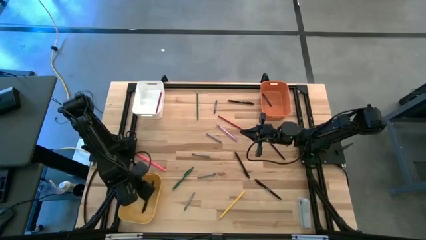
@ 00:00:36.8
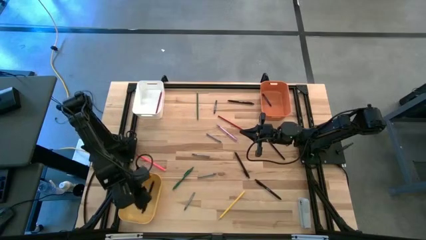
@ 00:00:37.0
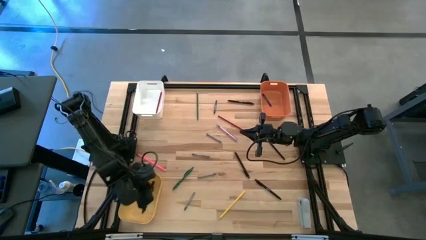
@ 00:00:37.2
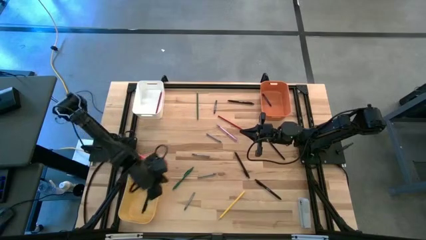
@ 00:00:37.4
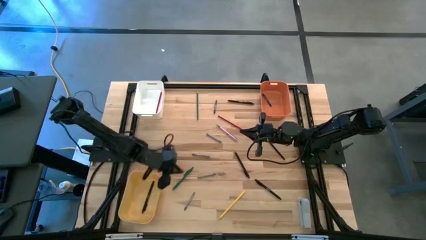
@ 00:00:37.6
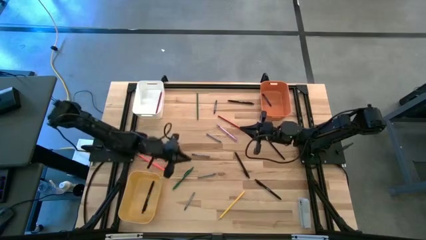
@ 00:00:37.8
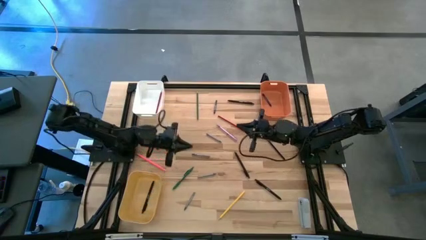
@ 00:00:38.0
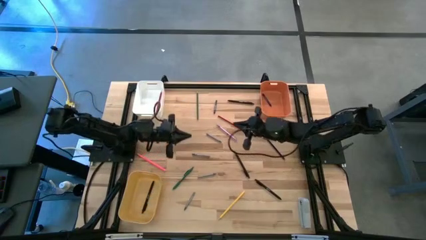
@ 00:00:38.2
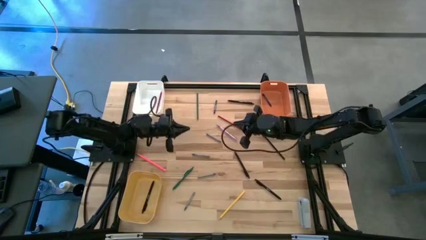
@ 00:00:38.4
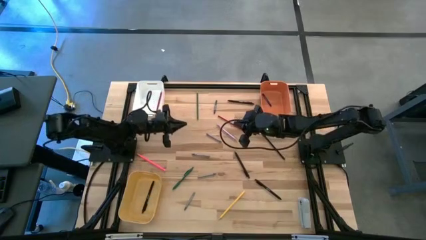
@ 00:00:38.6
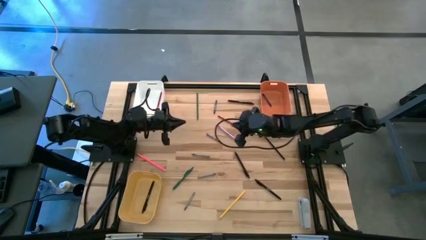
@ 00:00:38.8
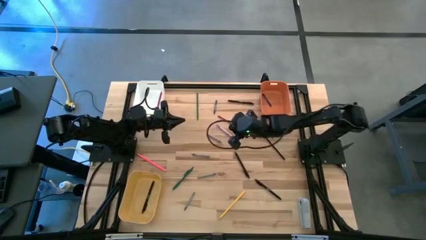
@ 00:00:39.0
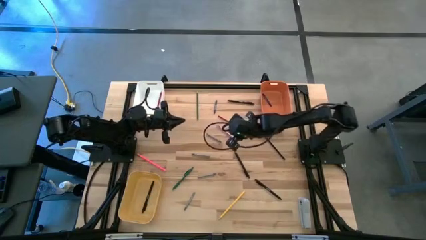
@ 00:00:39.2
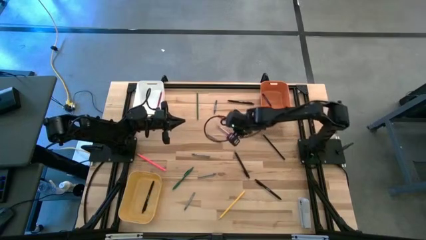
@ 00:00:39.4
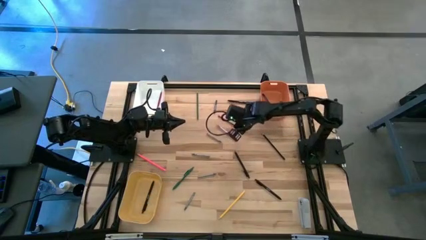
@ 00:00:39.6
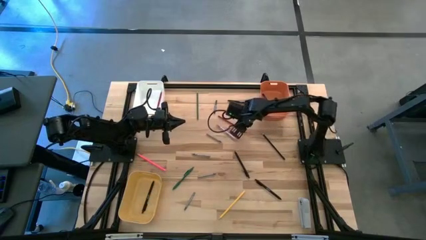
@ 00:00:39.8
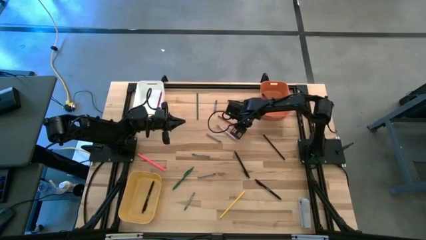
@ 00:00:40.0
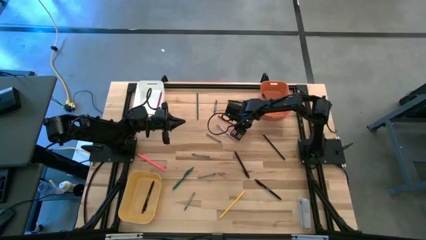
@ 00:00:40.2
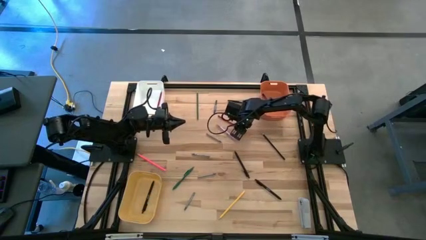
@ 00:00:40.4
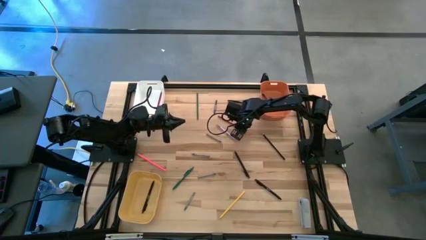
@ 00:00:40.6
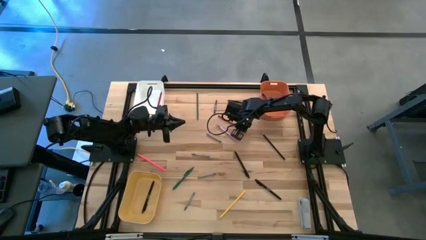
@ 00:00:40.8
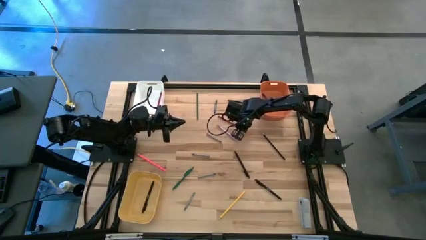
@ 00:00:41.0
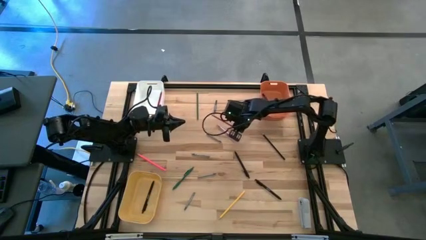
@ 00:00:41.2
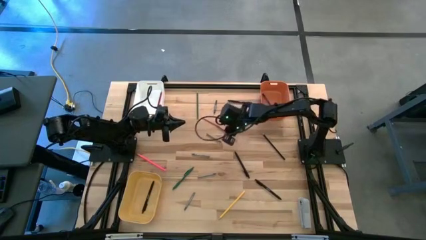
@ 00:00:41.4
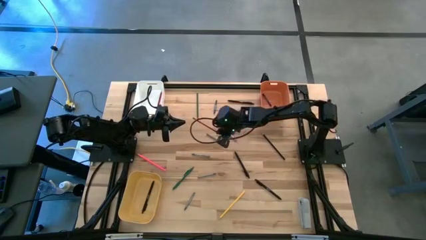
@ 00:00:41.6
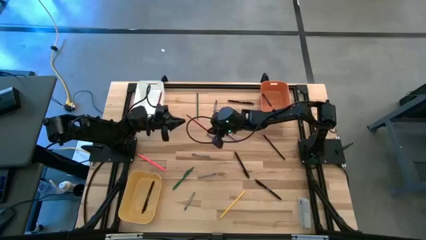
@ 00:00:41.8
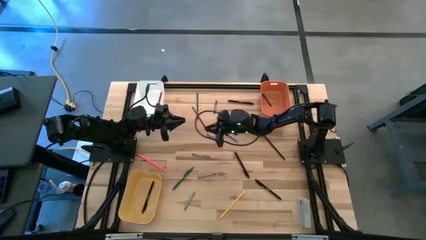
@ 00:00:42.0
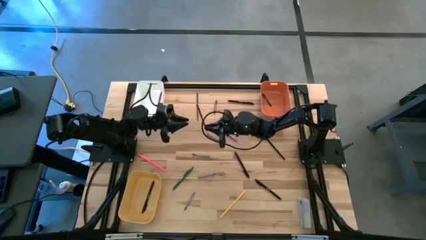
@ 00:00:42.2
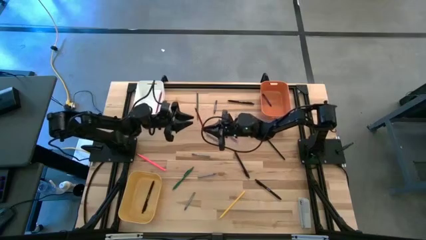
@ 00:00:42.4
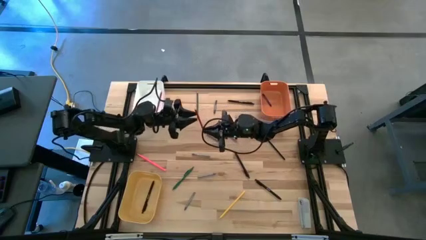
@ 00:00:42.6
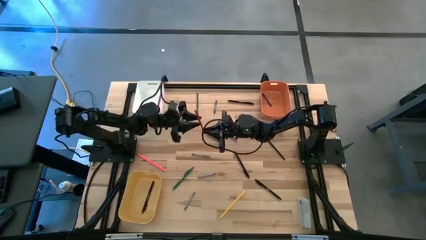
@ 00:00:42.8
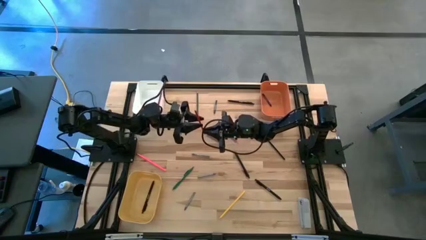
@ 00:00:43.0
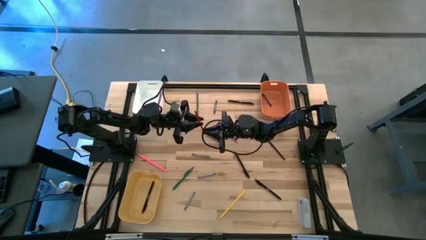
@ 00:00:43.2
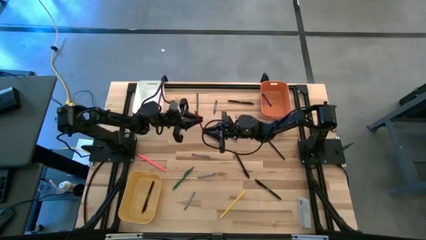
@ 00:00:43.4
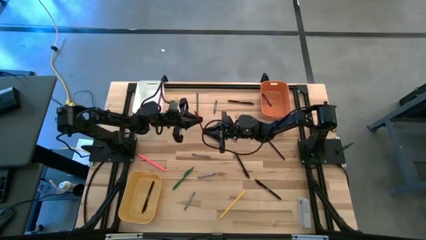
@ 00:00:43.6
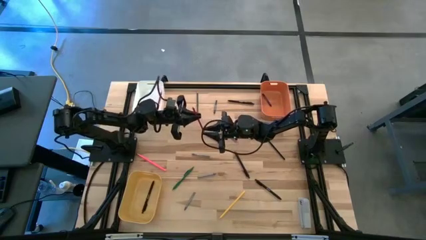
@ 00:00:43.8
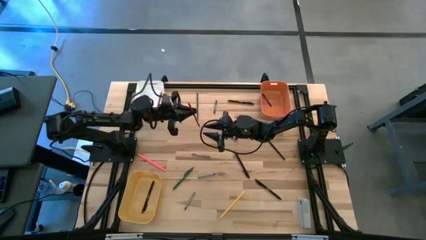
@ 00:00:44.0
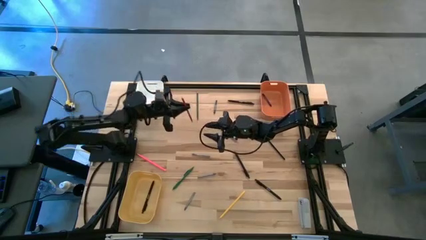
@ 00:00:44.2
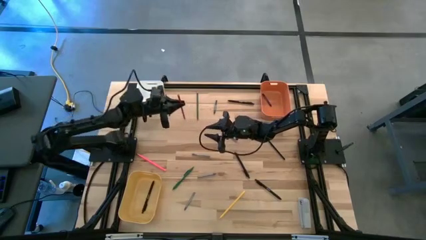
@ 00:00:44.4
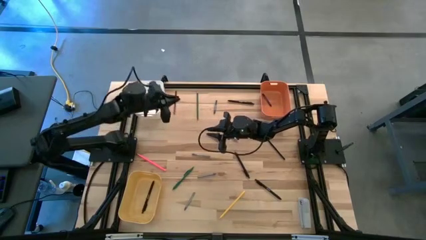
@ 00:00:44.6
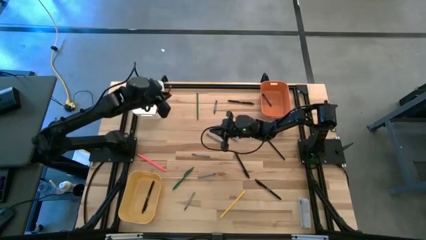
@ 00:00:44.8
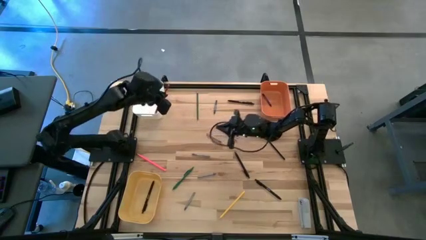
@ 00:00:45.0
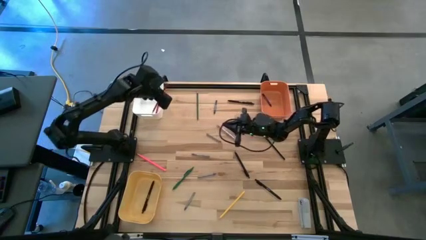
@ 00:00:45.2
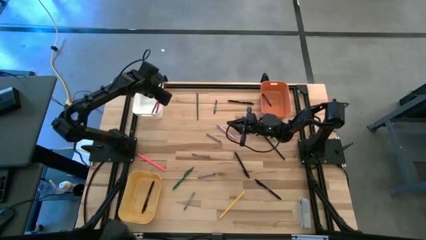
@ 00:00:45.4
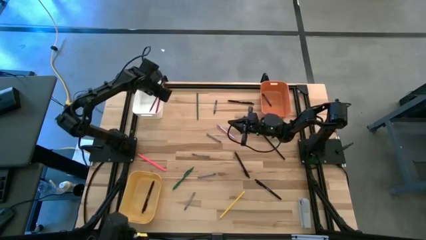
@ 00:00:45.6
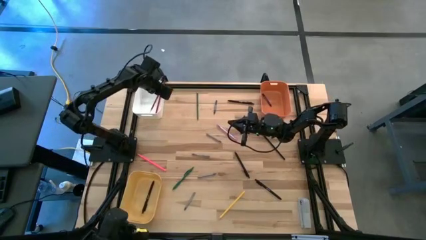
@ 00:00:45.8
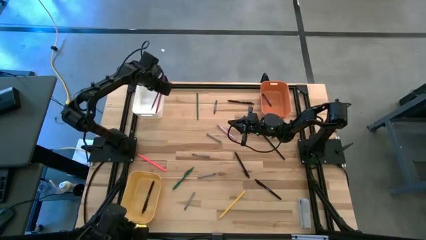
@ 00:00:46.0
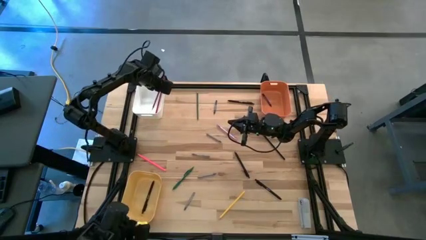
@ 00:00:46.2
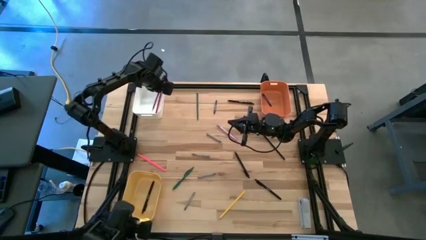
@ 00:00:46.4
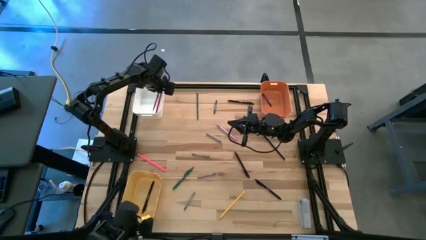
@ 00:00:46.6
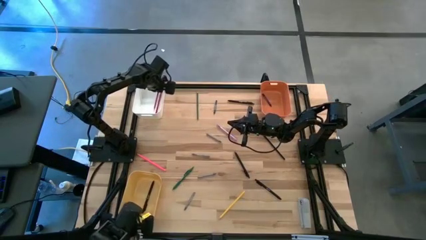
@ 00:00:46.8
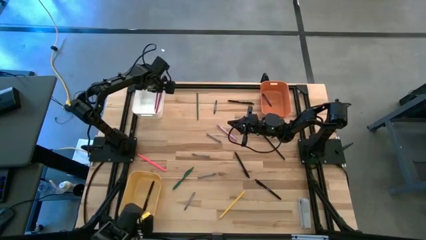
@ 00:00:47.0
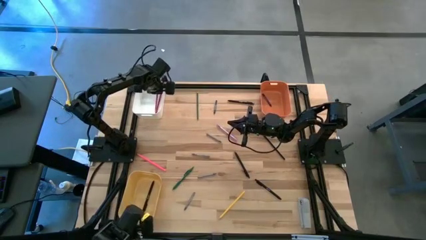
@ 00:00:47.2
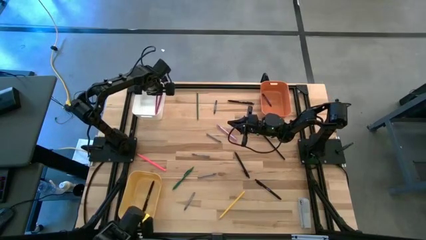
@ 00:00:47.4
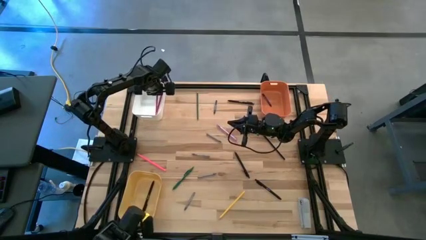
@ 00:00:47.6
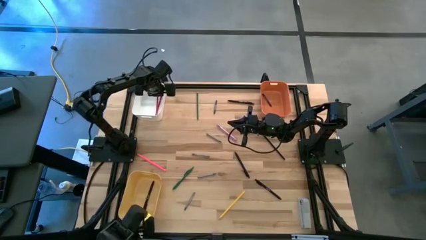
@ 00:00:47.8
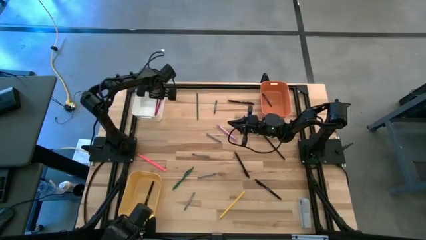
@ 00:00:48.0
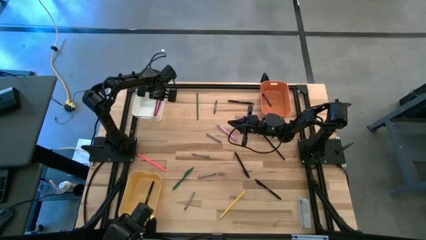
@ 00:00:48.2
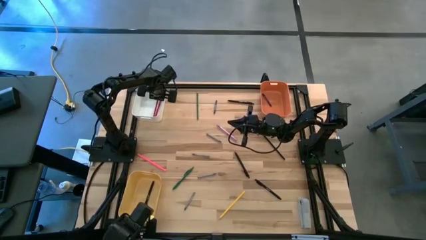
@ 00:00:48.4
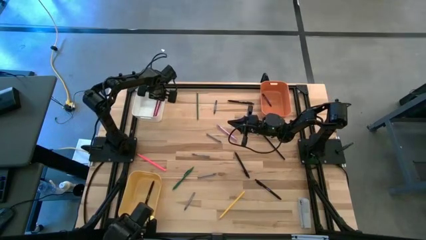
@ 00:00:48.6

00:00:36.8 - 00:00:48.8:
Task: Sort crayons/erasers/pens/pencils in bins
Put the red pencil into the white bin
